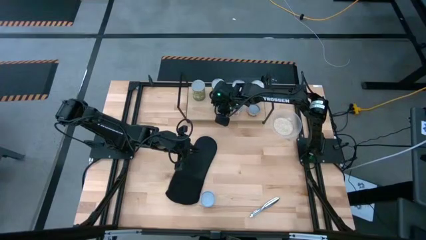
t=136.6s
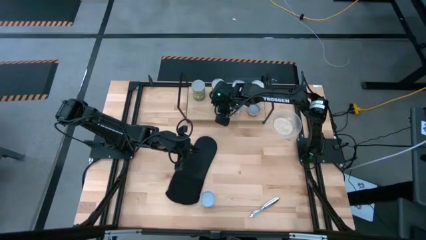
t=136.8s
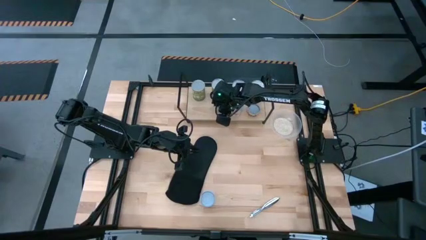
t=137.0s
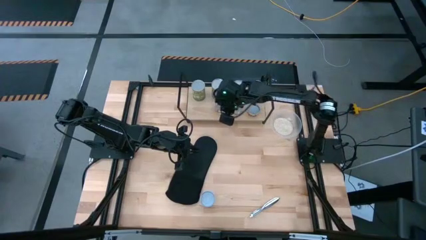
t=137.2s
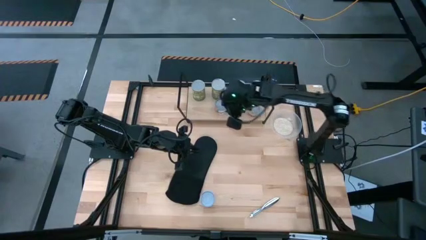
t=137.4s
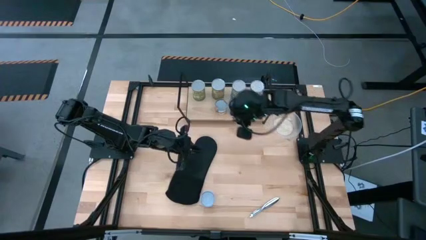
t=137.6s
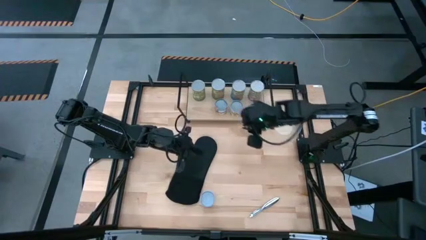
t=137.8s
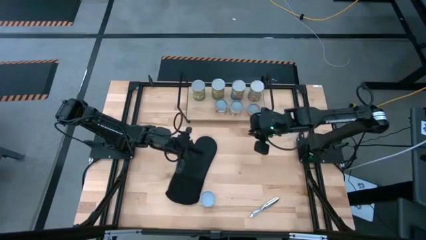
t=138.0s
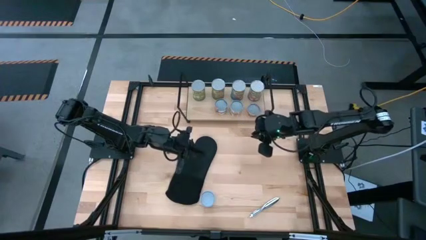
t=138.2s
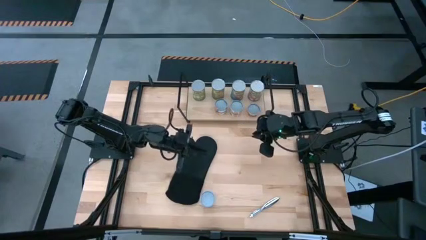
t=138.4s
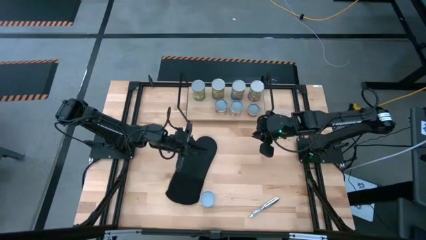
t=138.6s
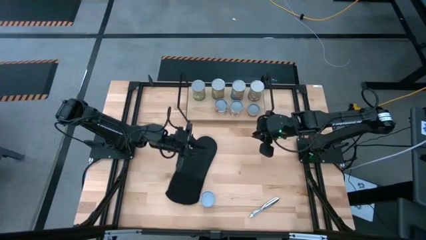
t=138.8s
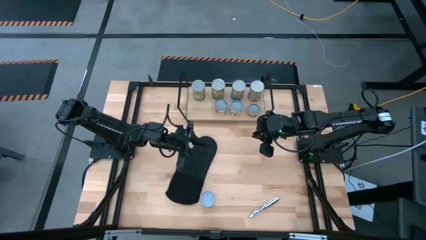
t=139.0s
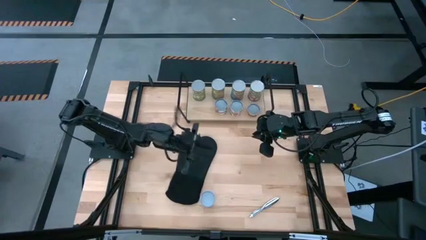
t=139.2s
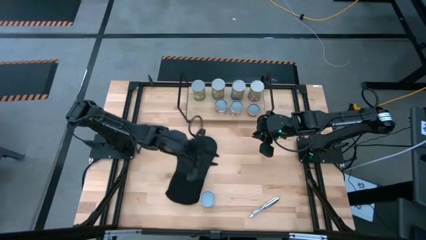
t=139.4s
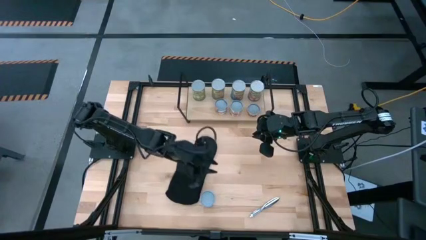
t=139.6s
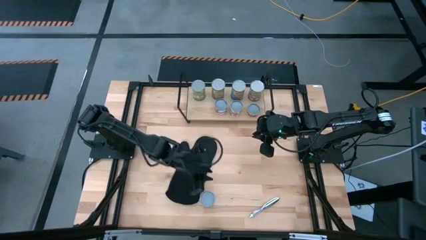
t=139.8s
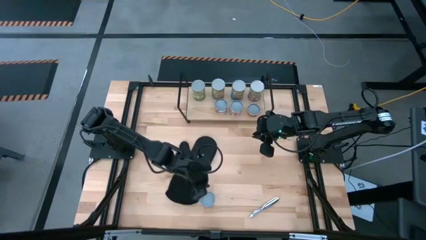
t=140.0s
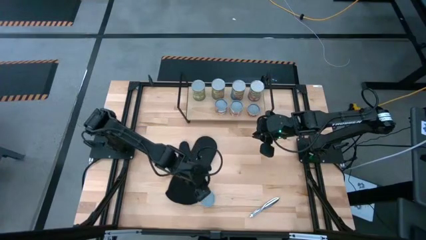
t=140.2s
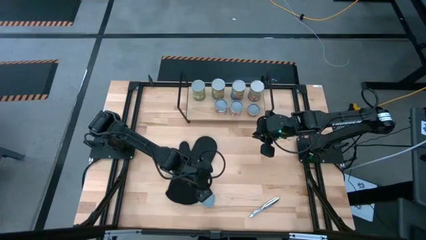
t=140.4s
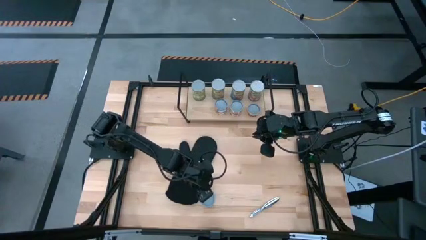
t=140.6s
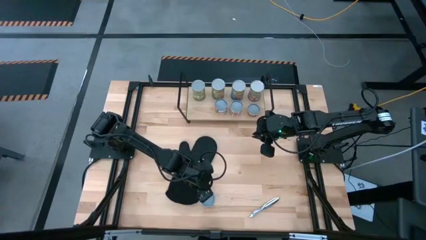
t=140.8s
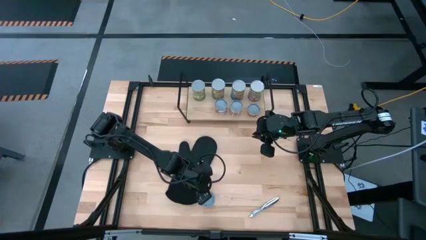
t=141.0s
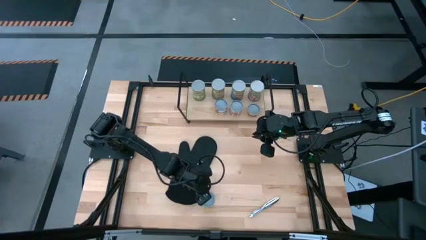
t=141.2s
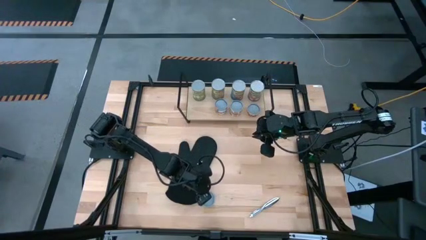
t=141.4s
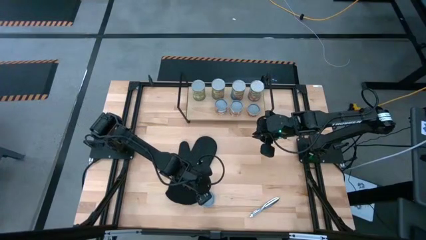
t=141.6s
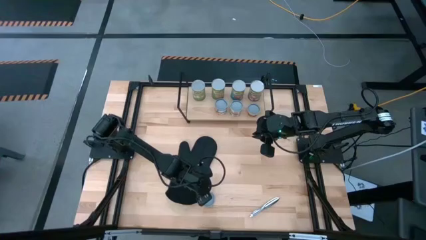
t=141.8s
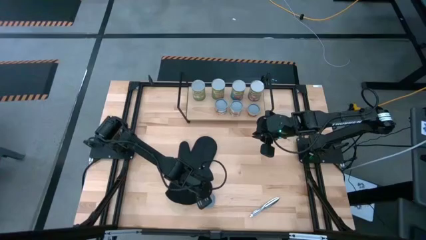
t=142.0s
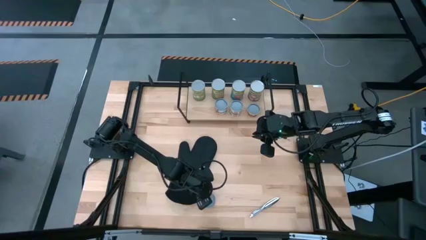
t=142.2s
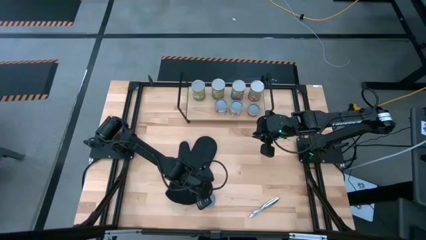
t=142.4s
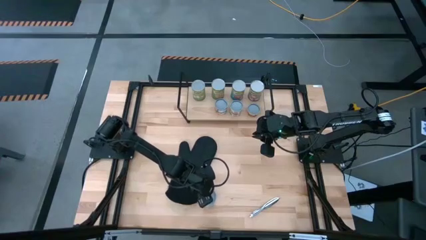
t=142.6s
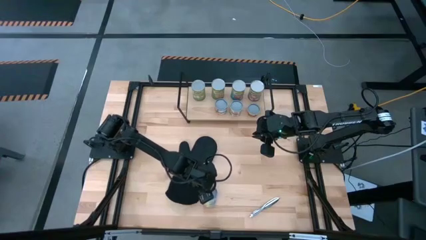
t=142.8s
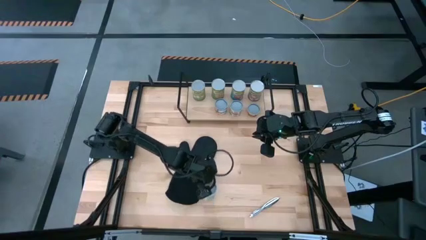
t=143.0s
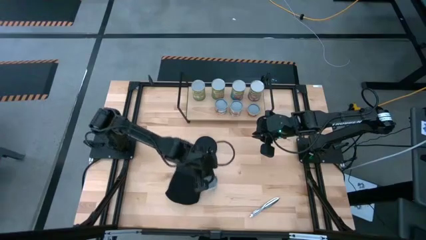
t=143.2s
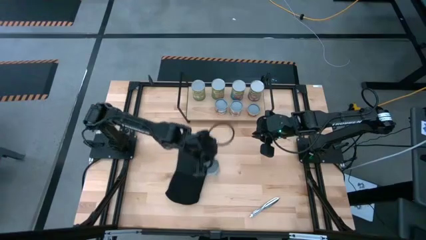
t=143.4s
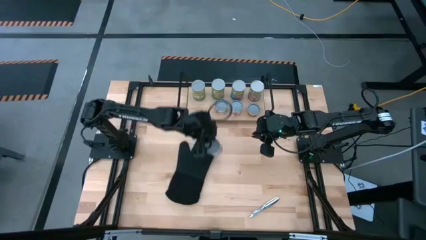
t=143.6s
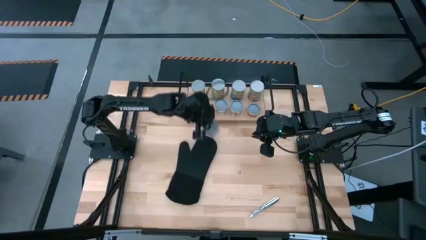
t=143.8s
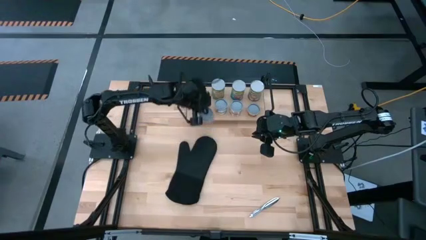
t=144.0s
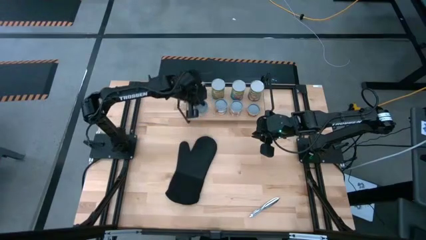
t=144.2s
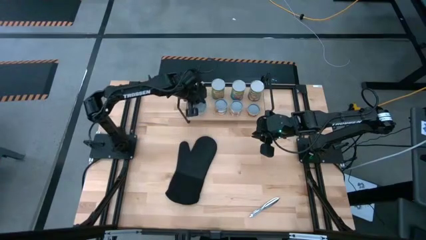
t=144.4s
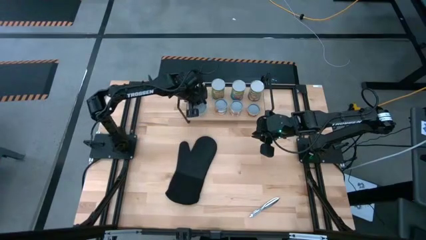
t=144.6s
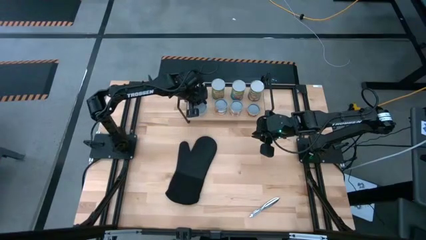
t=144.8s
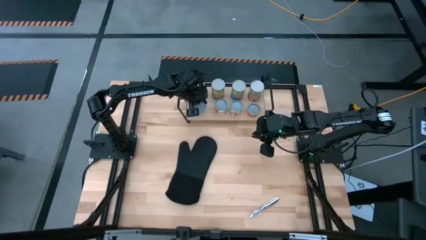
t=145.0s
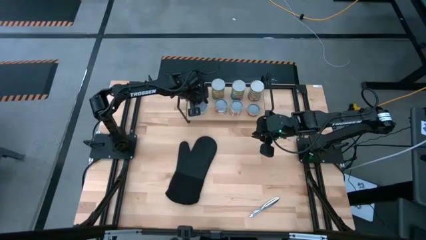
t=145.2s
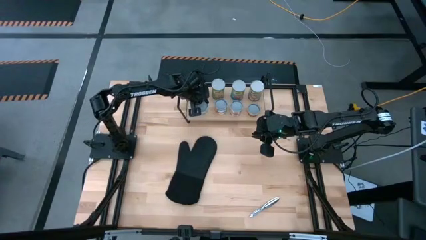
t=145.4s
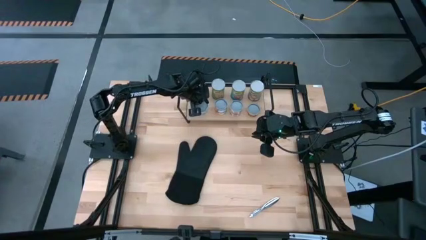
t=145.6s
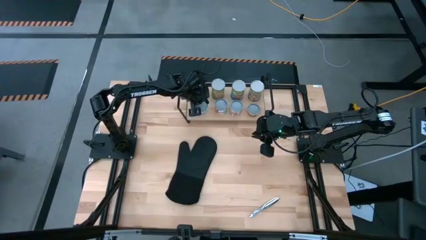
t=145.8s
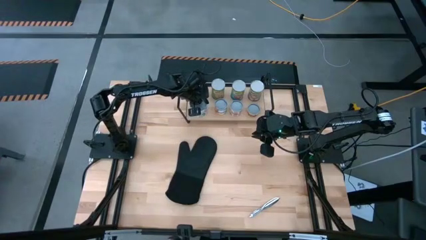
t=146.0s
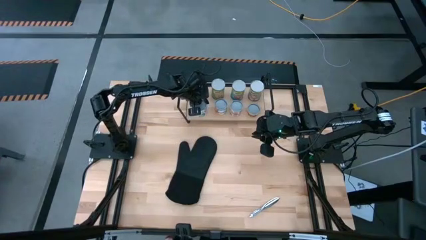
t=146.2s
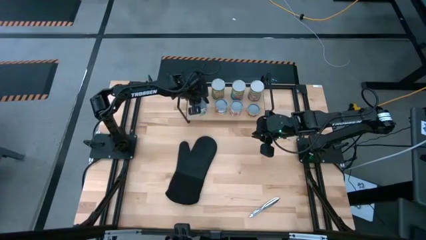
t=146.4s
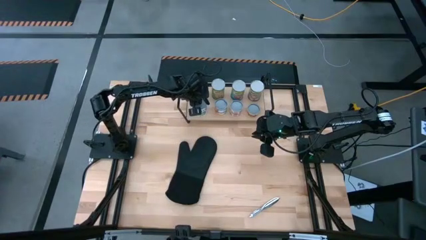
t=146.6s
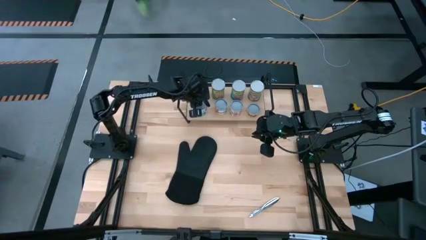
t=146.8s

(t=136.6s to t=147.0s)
Task: Pick and place cans onto a shelf
Put the canned mix fruit on the shelf

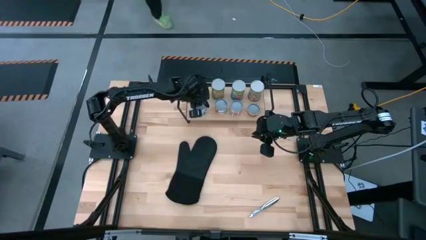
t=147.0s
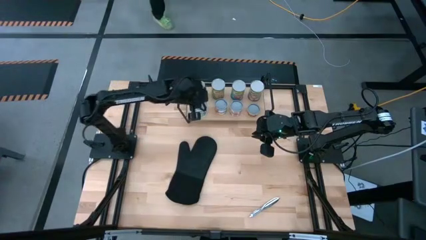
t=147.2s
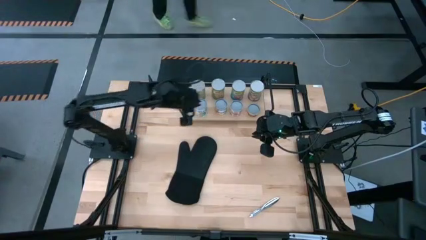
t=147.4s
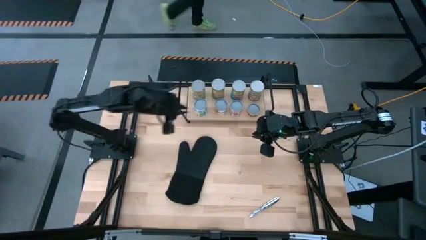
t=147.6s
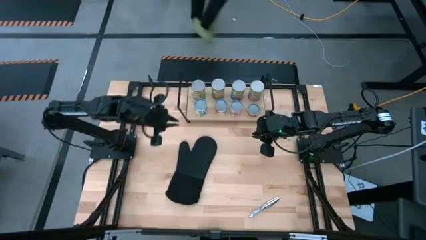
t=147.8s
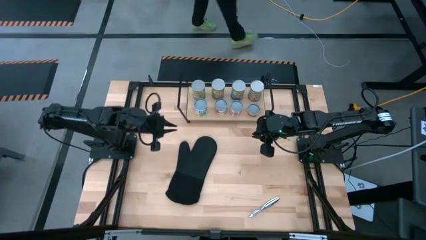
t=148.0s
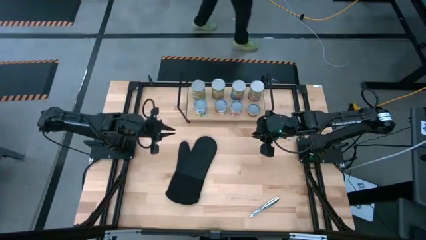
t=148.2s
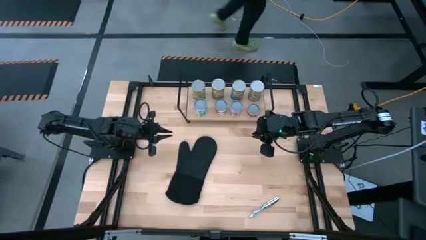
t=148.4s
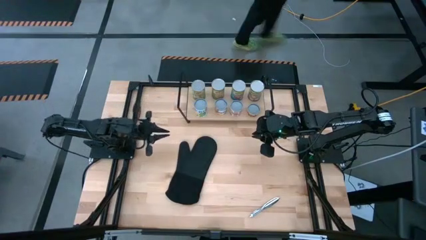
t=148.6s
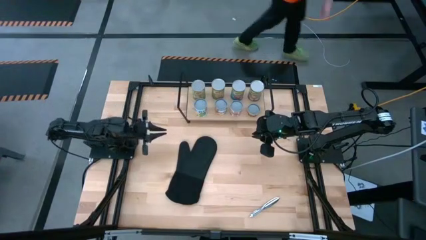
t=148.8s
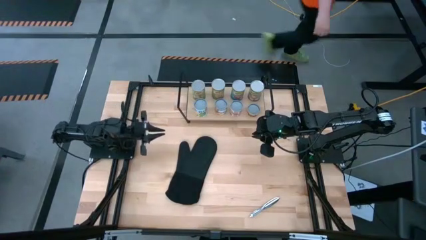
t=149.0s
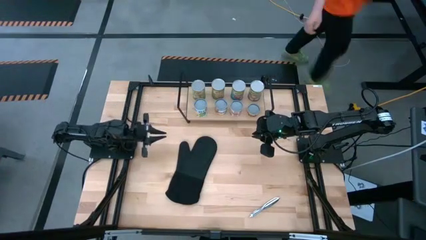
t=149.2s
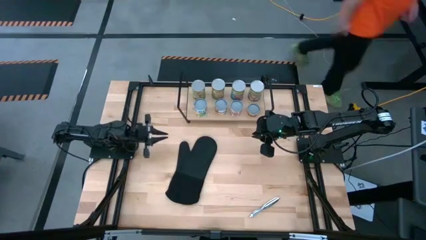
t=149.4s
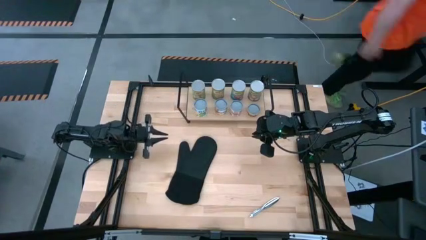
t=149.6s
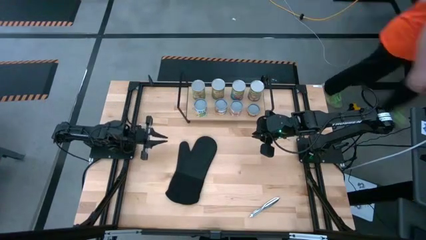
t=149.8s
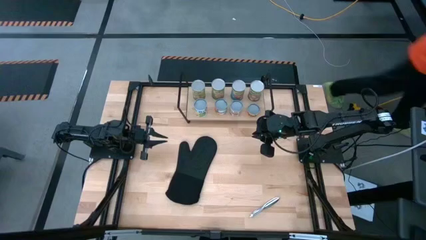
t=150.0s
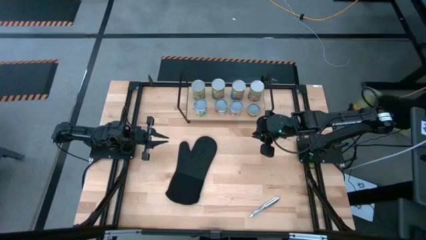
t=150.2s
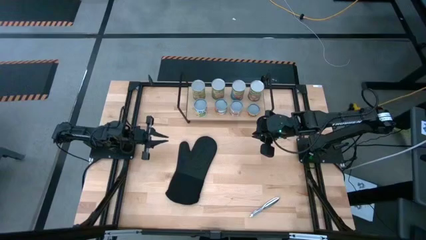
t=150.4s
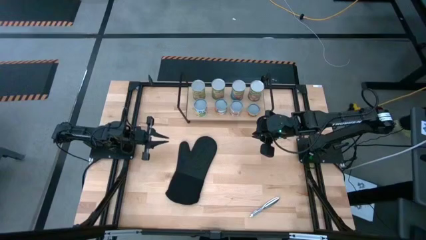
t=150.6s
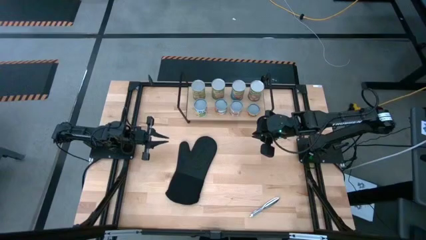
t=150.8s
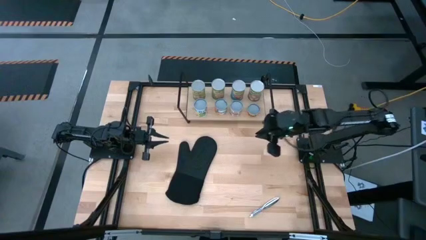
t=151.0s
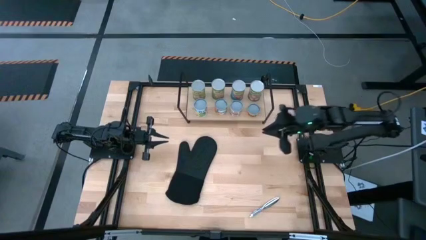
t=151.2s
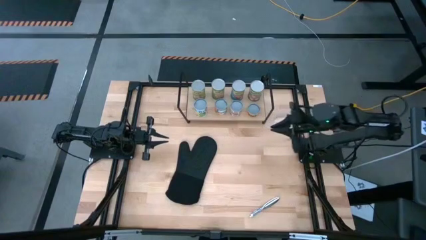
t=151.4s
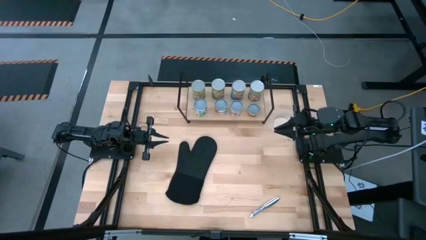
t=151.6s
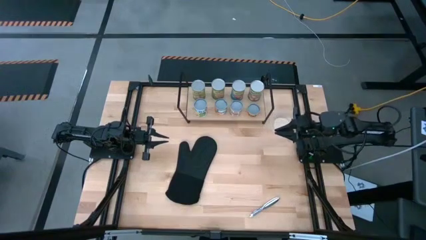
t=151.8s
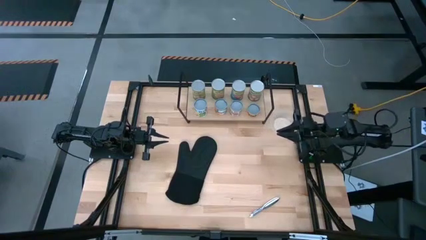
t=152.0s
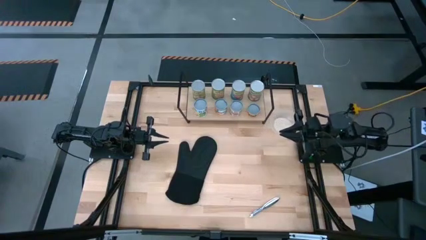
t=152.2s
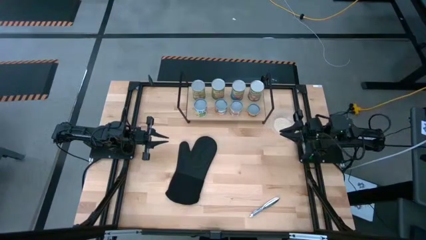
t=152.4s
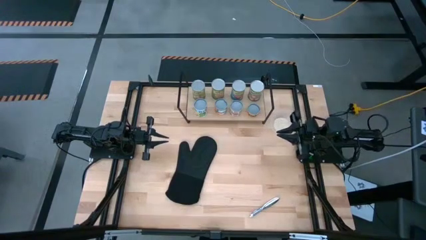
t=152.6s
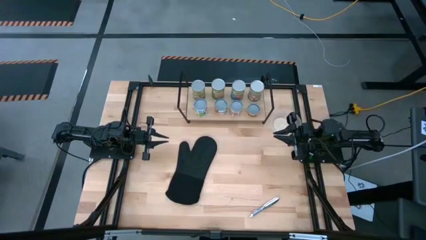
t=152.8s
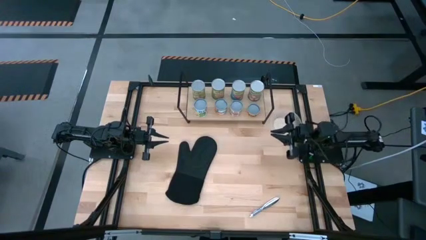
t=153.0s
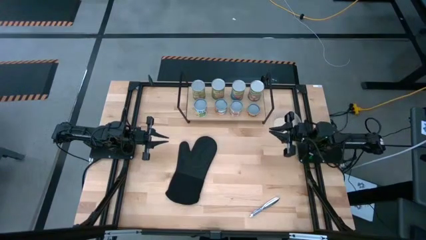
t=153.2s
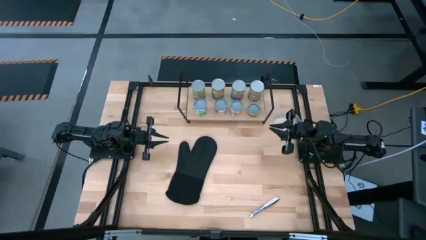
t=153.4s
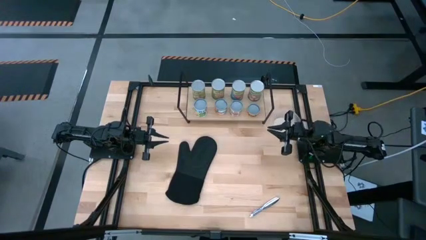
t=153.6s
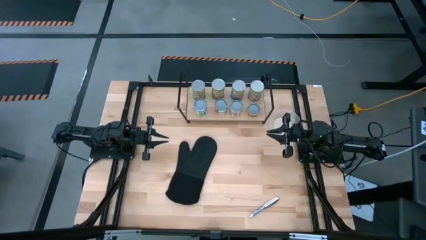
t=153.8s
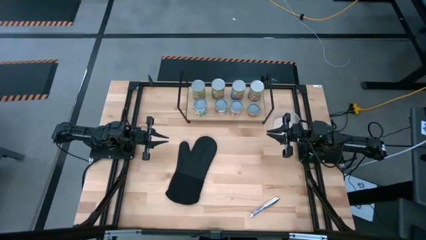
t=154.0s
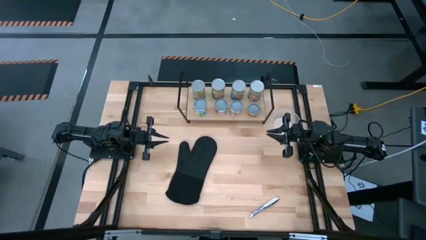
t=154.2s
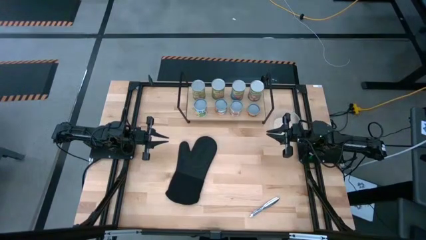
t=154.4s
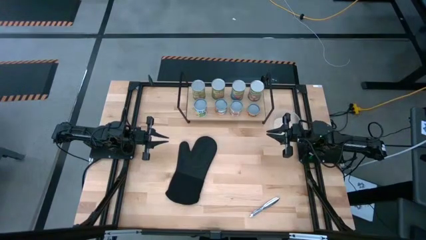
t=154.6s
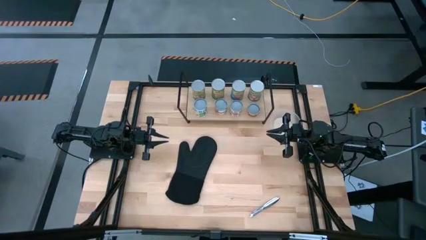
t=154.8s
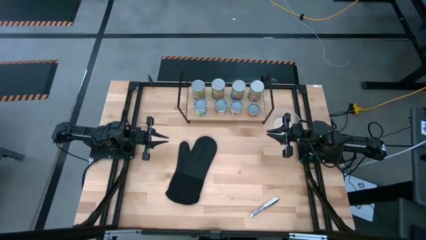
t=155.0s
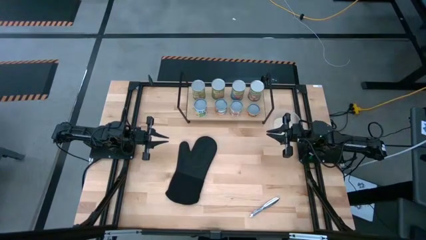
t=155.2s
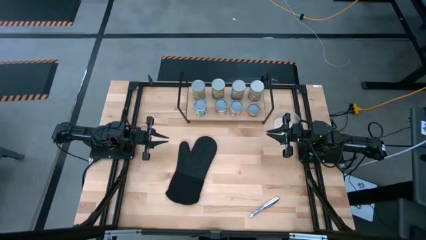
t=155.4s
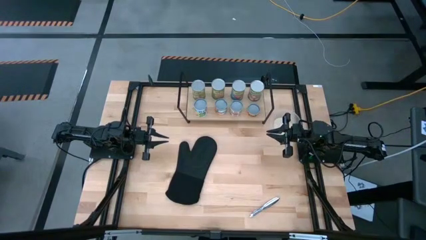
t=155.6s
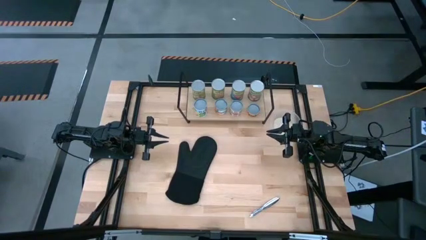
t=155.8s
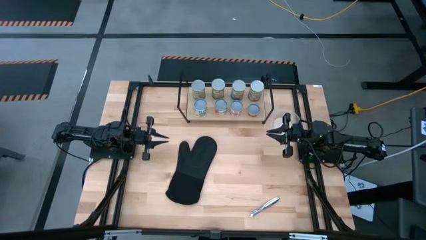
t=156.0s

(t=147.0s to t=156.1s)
Return to Home Position
